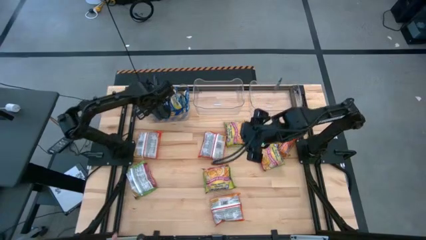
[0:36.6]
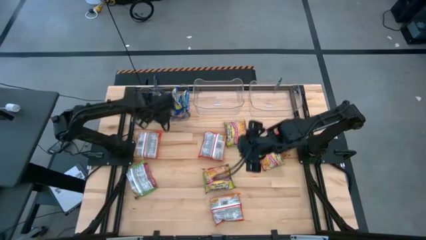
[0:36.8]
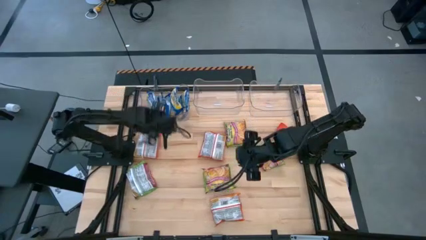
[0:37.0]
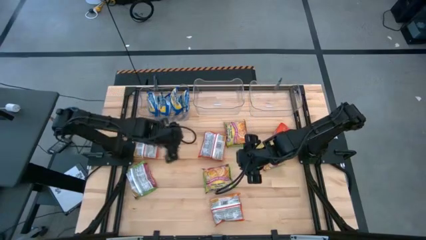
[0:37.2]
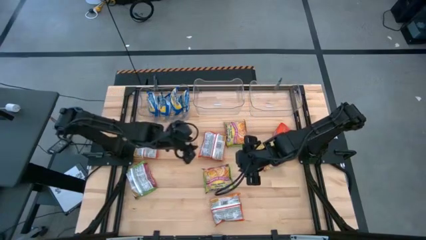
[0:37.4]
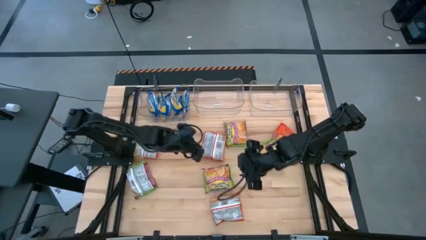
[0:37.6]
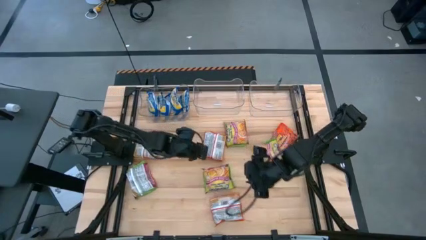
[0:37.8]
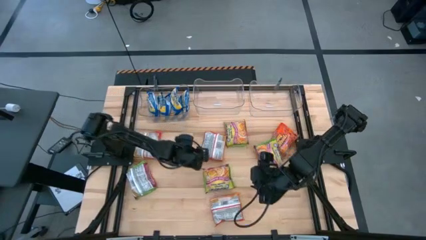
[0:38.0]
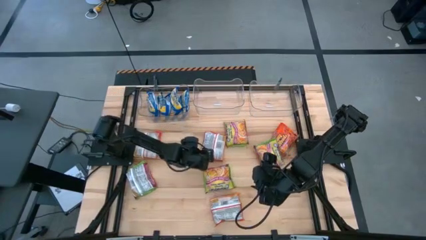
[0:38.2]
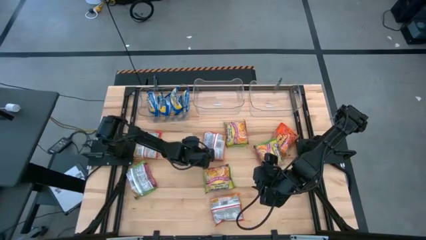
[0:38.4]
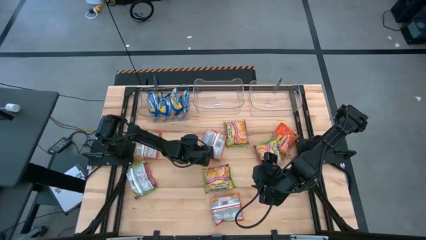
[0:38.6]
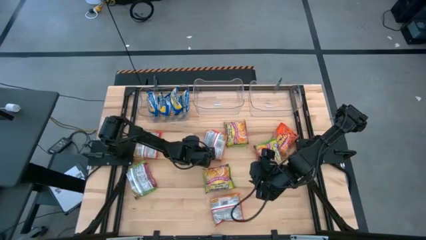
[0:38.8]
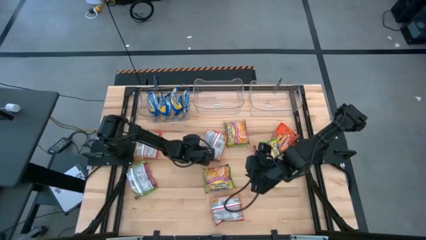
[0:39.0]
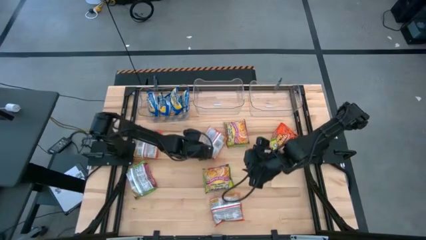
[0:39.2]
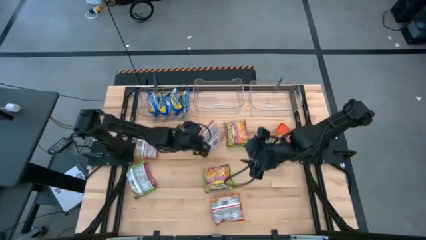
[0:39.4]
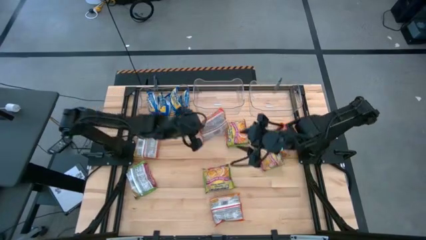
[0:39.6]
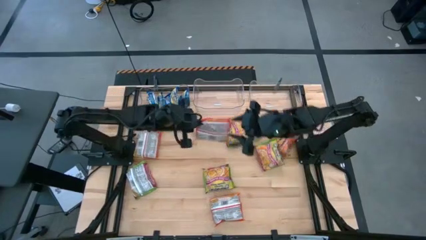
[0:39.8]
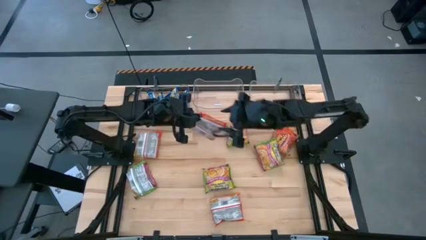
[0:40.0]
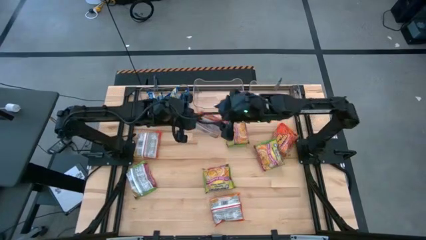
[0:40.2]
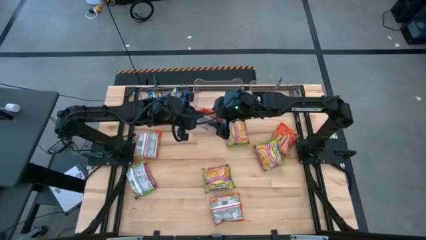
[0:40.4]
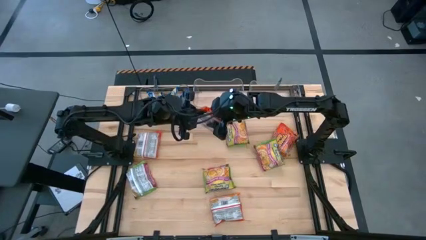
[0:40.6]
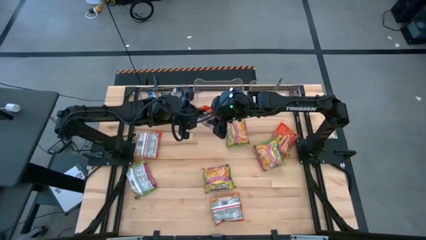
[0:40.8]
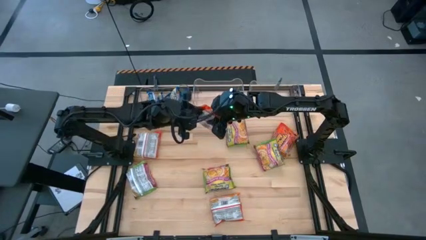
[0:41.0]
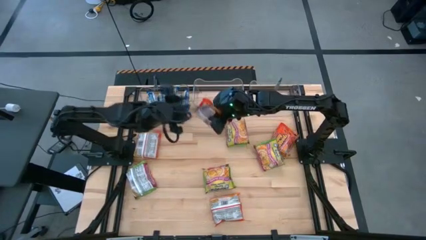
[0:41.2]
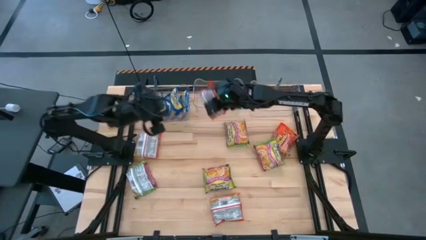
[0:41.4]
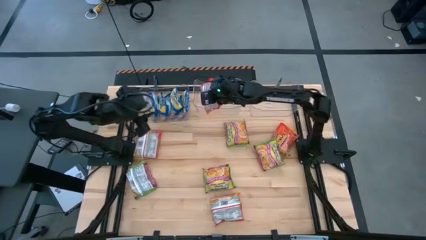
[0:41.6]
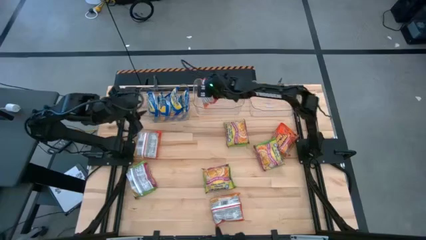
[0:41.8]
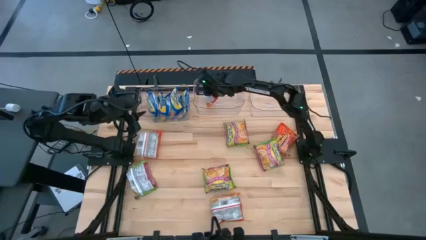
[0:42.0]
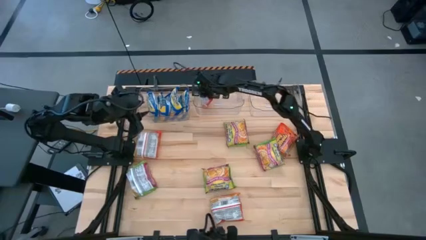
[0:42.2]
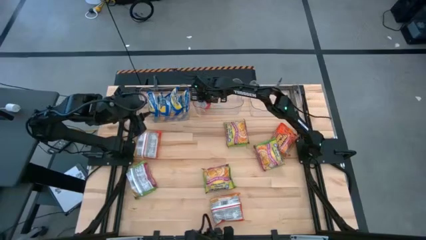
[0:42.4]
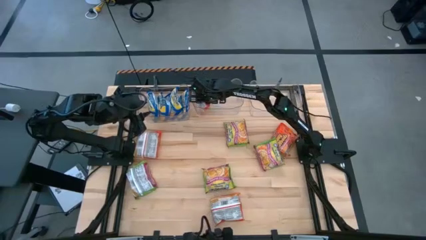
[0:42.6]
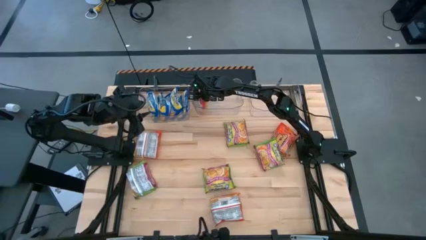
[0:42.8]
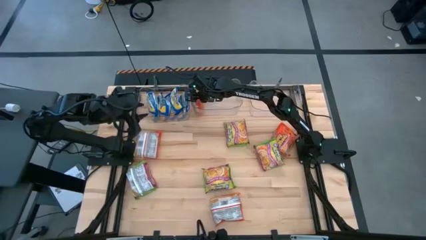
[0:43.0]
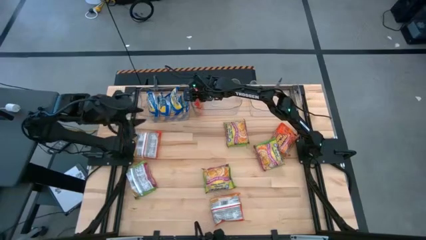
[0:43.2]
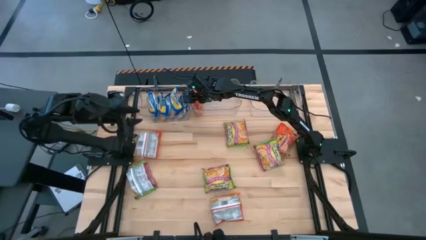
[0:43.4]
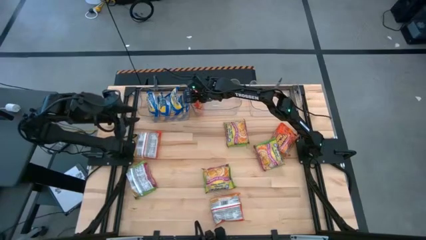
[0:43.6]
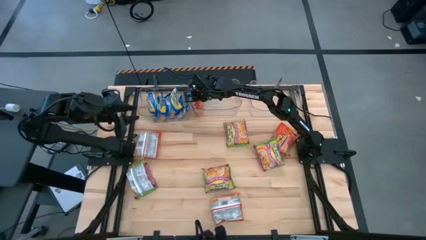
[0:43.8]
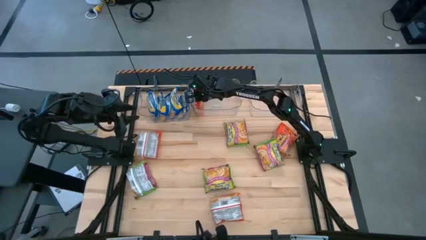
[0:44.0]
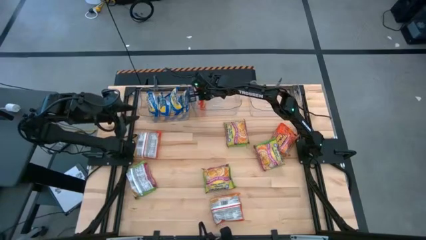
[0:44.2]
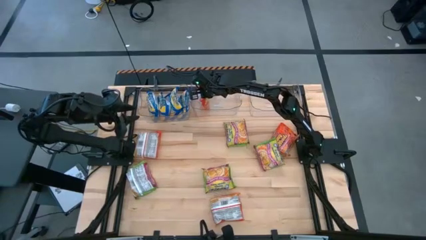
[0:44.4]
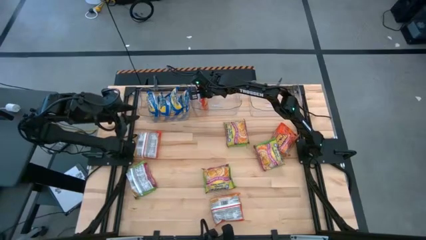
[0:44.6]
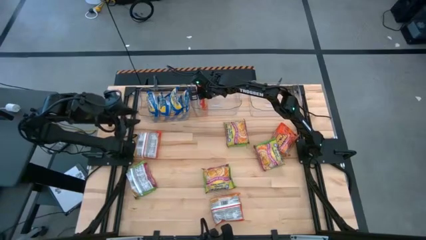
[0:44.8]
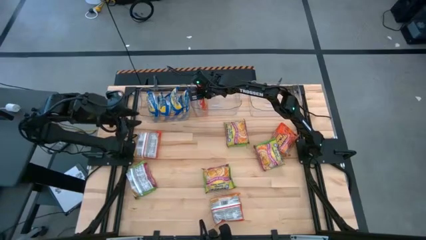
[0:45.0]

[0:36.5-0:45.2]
Task: Sort Maruchan noodles
Put the orange noodle pack into the middle transparent bin

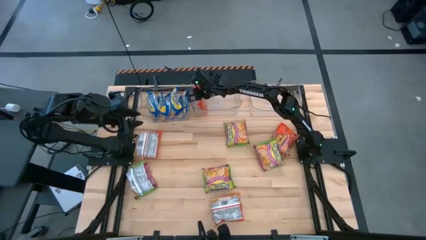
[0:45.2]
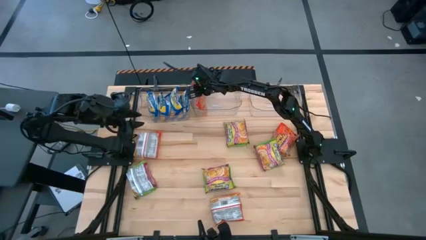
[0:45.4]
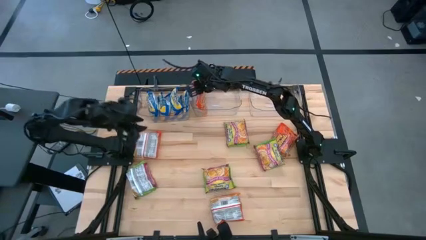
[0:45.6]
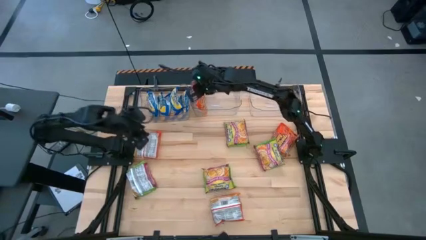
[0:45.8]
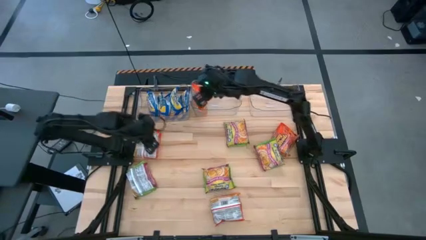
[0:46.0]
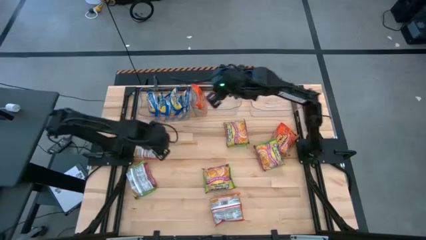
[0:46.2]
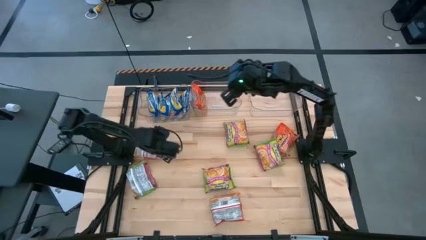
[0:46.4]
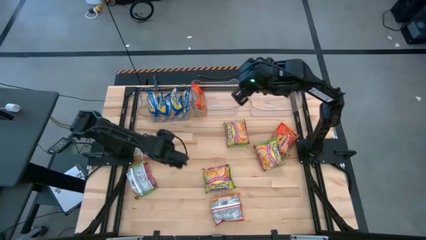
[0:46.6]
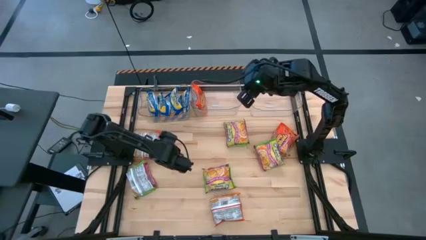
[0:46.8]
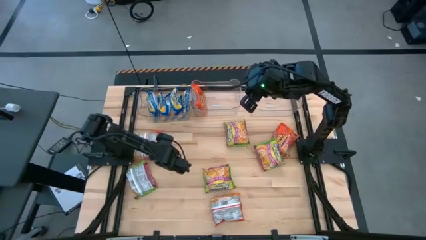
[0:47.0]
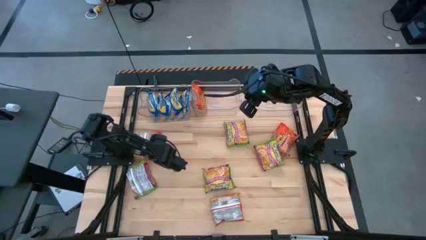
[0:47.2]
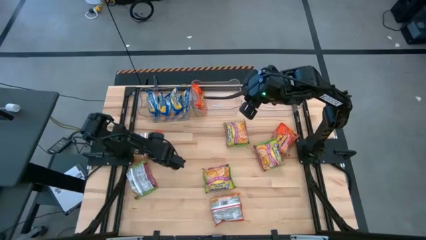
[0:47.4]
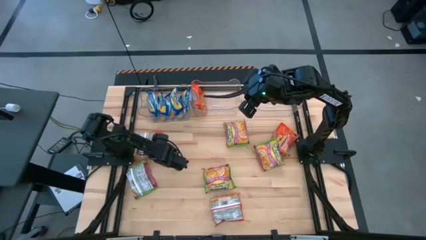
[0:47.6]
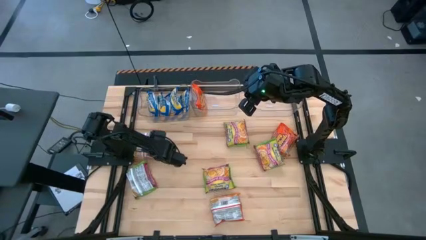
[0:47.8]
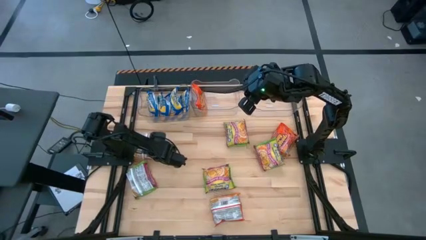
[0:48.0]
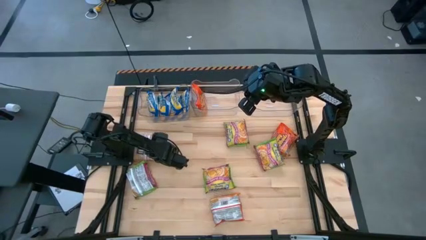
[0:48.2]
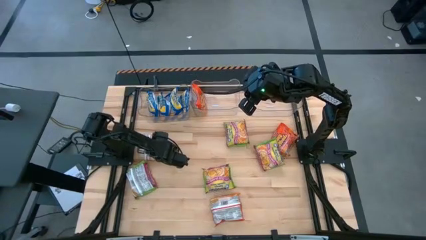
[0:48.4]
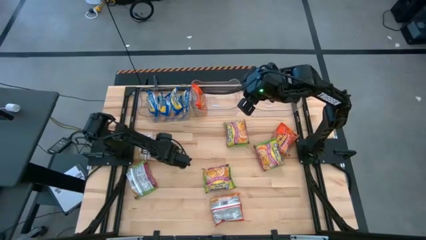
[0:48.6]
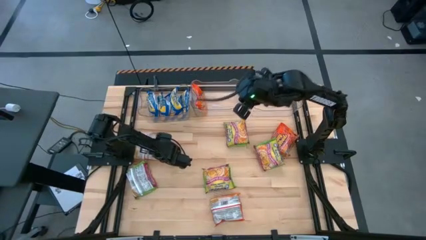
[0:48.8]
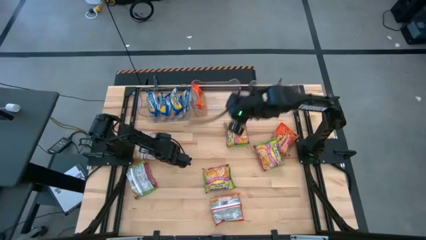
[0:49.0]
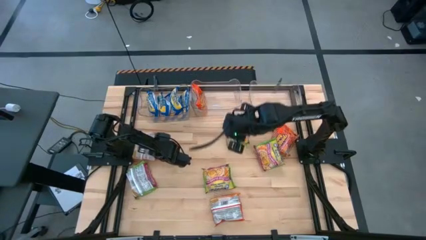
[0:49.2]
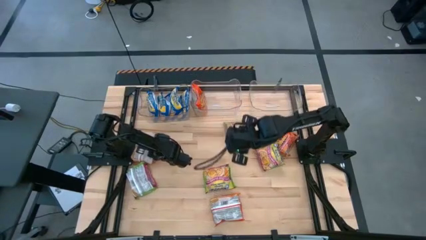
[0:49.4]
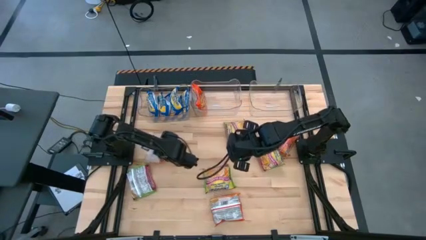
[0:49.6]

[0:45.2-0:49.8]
Put the orange noodle pack into the middle transparent bin

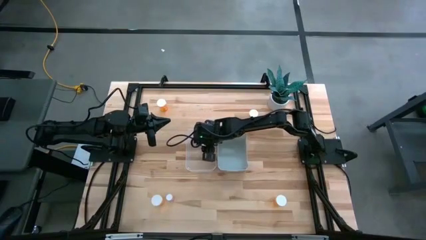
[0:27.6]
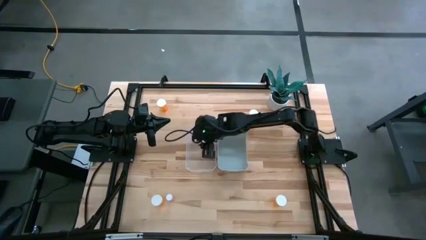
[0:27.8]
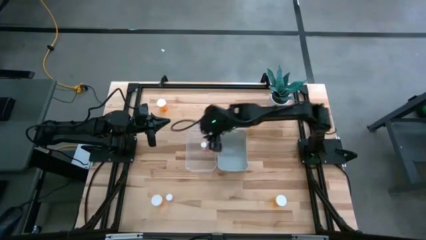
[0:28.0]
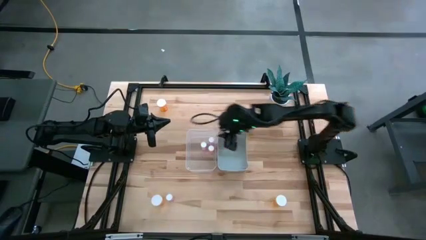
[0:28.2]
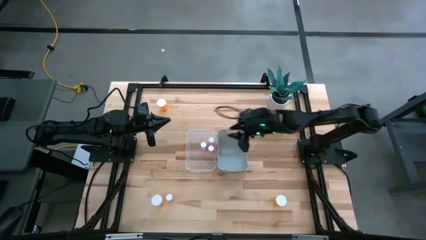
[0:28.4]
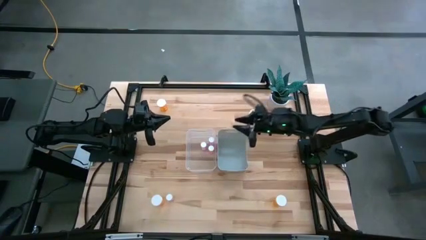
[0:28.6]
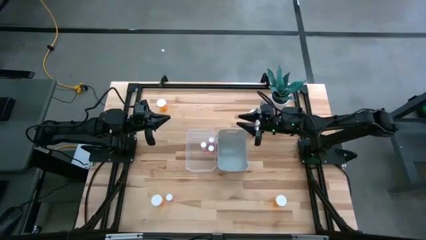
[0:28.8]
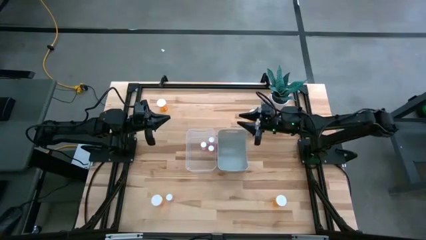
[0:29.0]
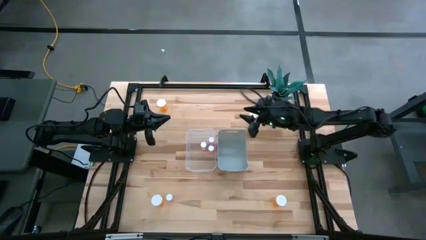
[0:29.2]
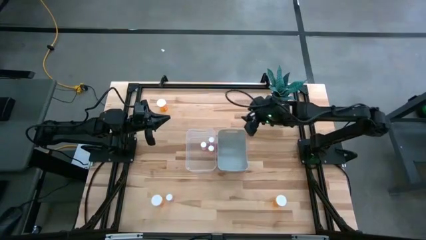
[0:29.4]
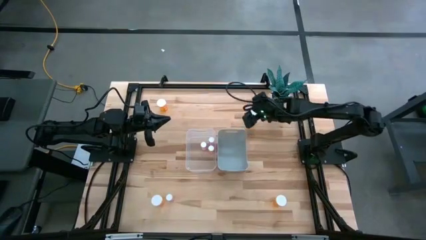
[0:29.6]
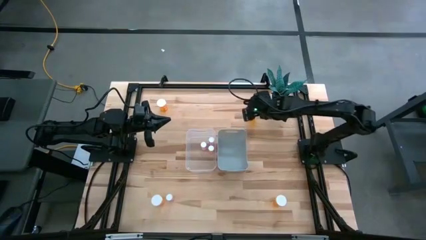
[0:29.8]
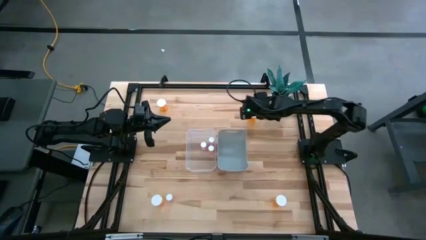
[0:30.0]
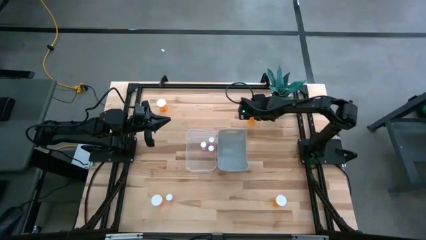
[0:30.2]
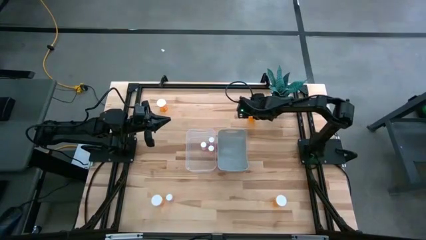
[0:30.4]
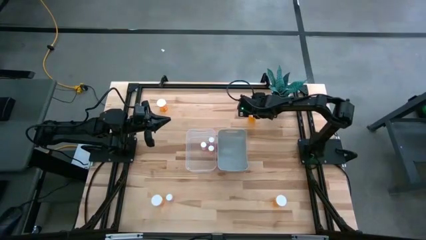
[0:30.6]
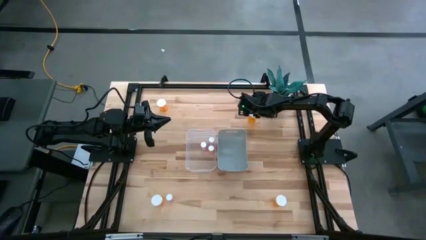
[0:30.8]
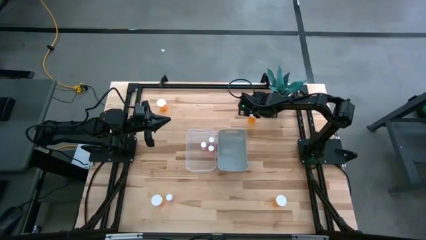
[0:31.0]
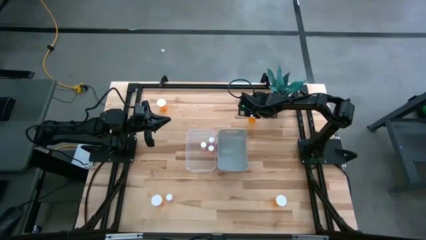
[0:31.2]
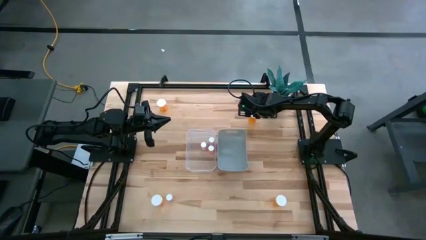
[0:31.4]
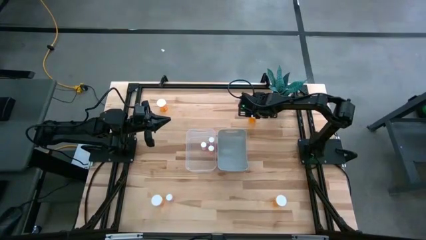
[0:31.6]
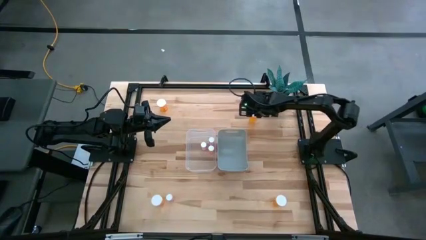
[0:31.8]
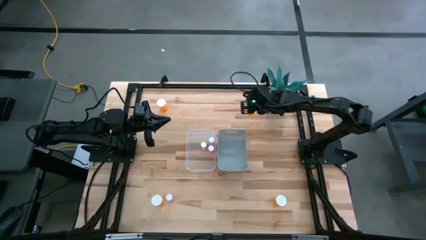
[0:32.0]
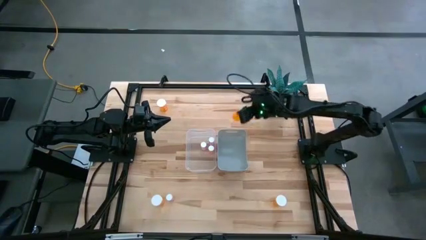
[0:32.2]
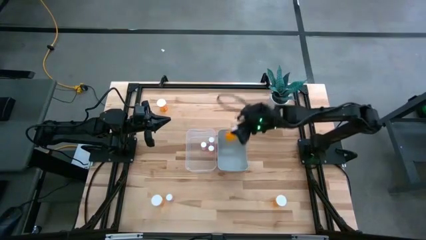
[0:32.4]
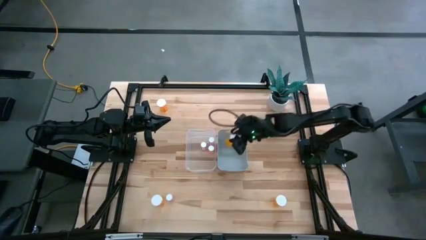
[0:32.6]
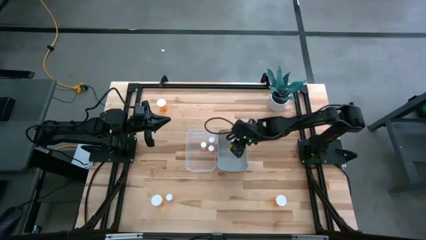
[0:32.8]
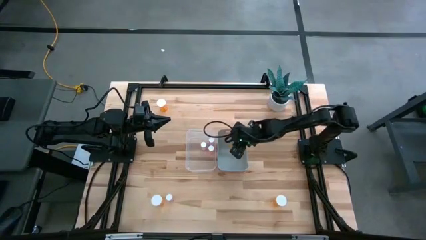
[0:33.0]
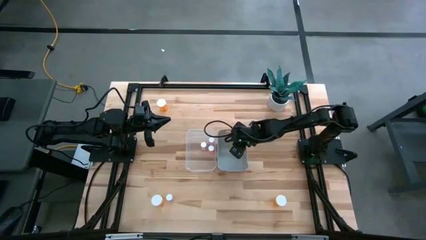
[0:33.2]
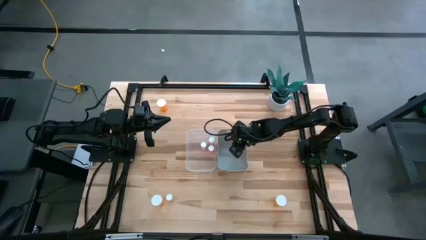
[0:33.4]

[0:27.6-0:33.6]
Task: Pick and place medicine bottles into bin by pill shape (circle, oval)
Put the large orange pill bottle into the gray bin
